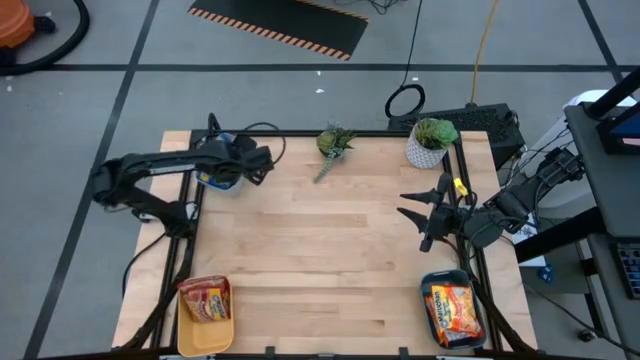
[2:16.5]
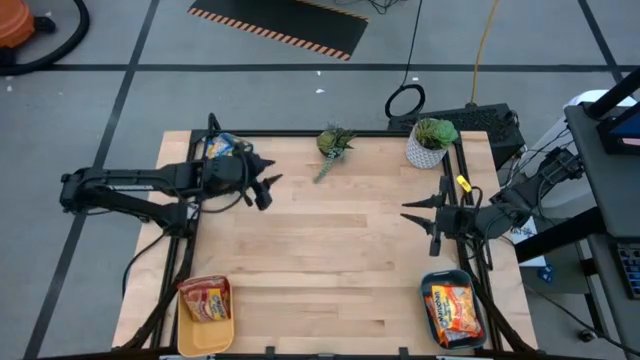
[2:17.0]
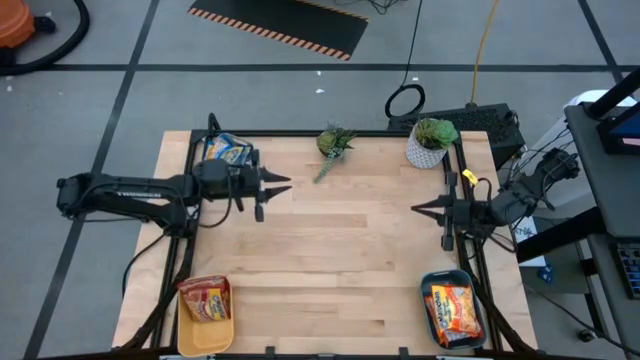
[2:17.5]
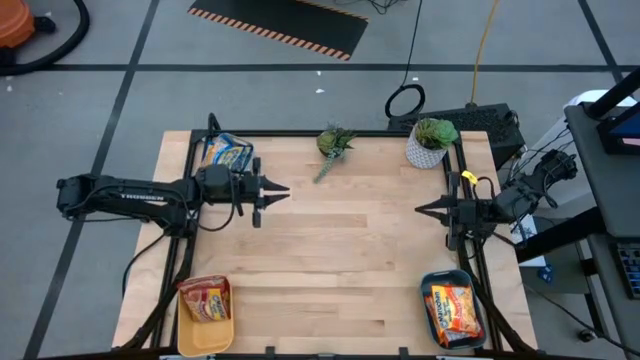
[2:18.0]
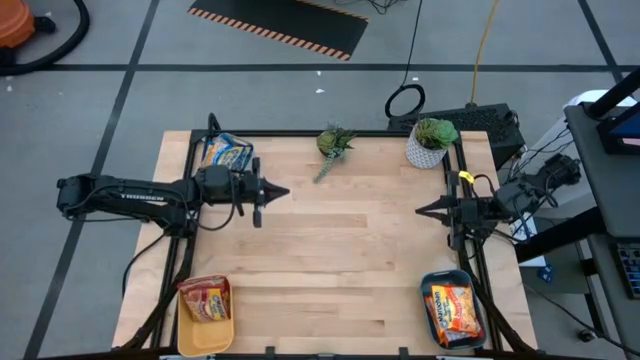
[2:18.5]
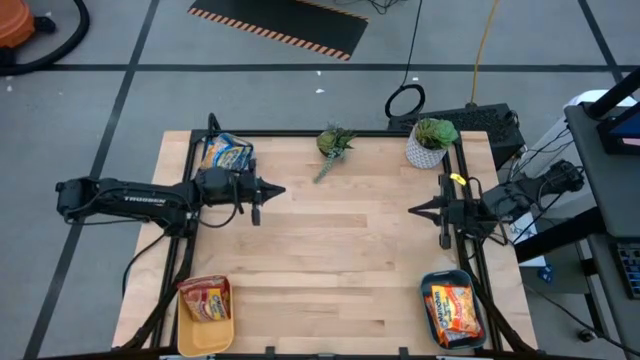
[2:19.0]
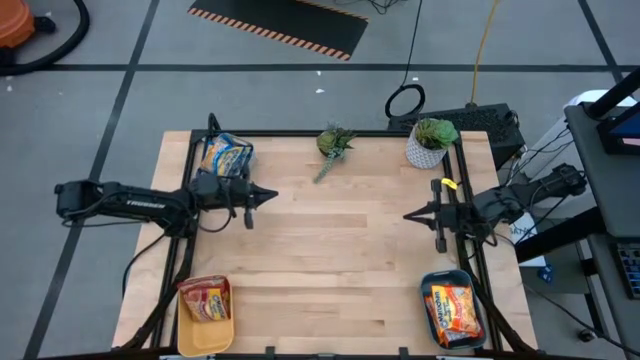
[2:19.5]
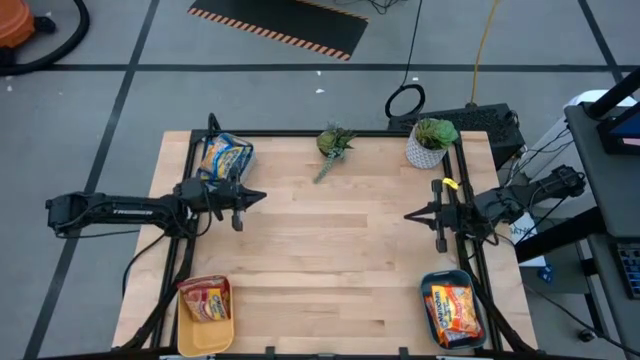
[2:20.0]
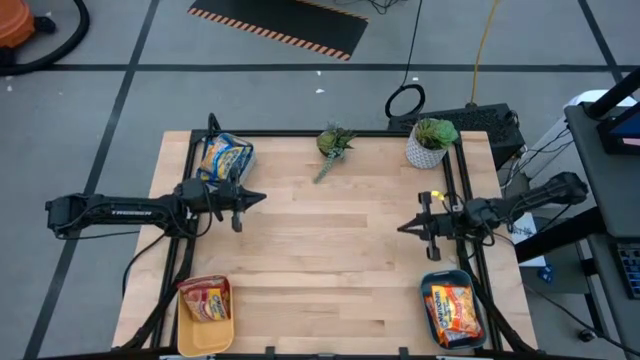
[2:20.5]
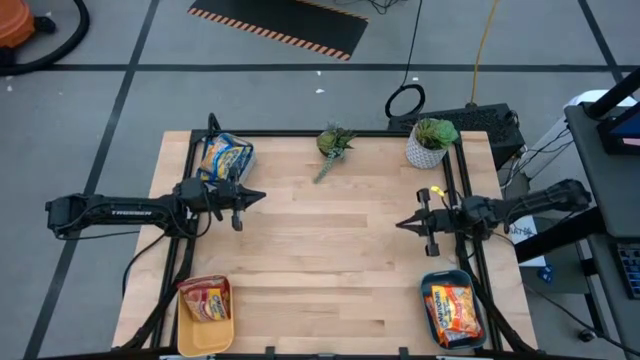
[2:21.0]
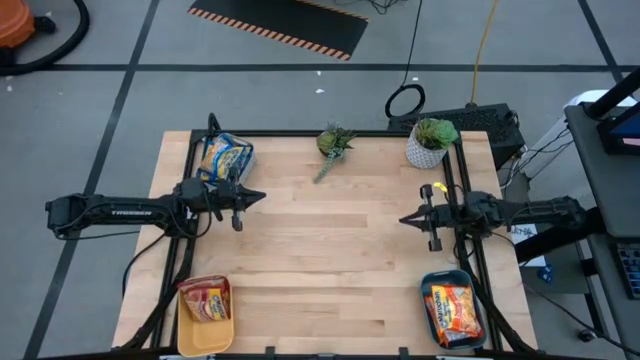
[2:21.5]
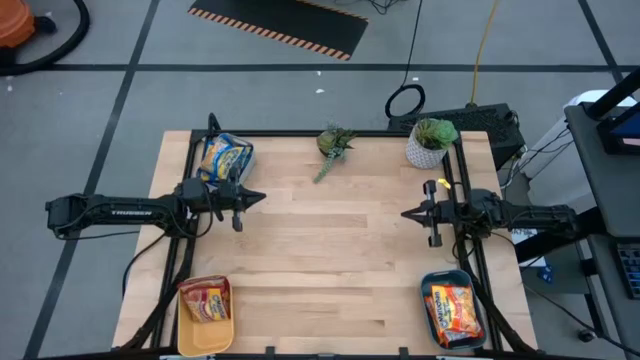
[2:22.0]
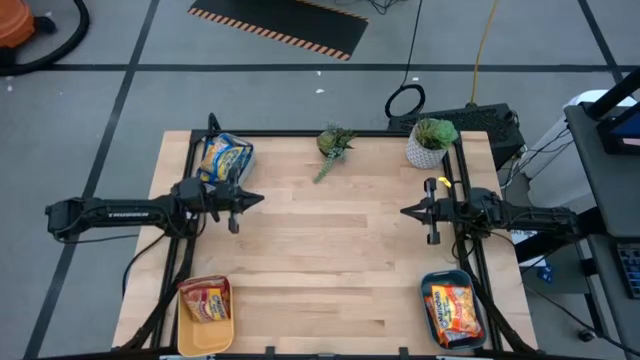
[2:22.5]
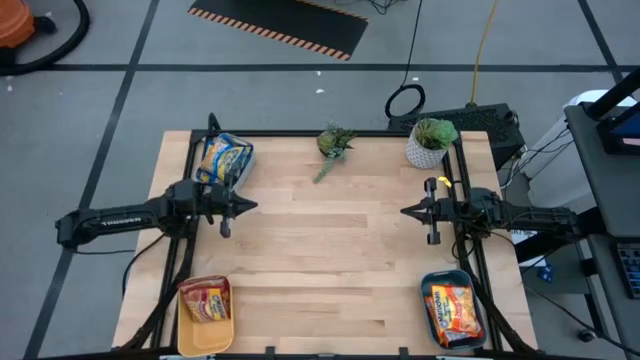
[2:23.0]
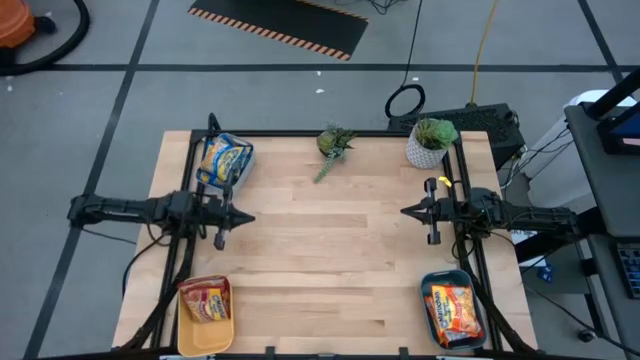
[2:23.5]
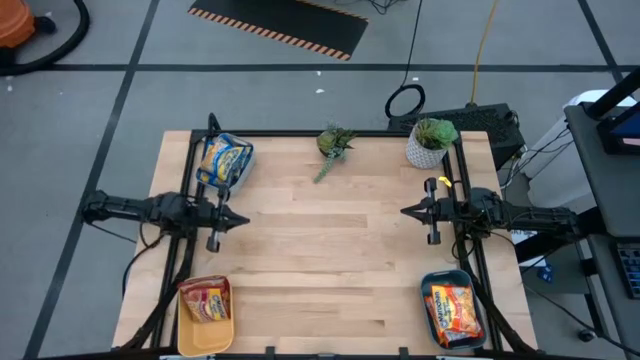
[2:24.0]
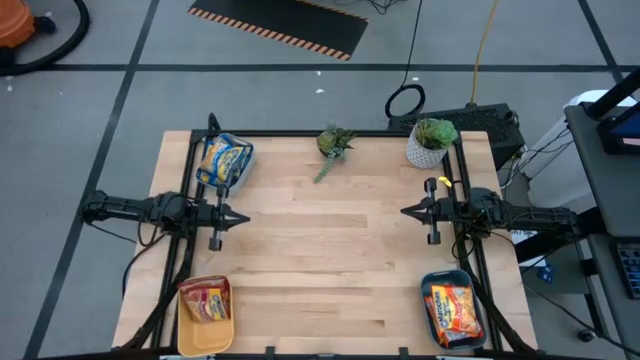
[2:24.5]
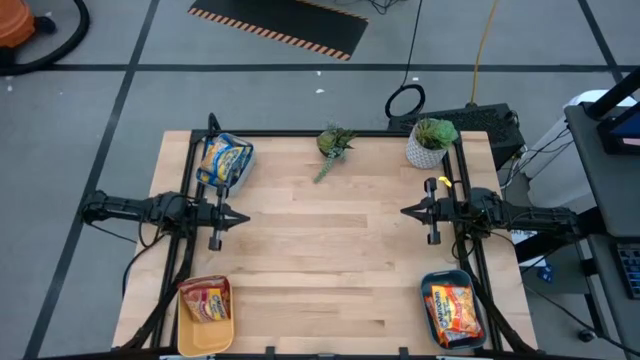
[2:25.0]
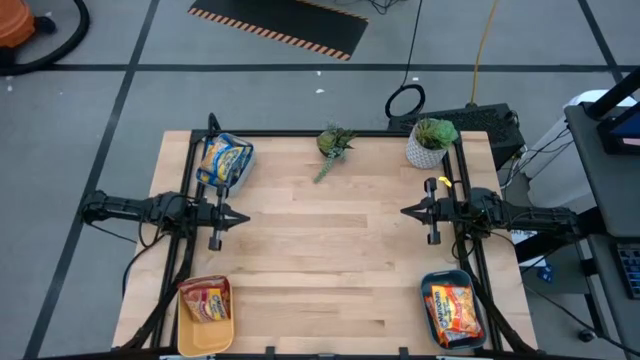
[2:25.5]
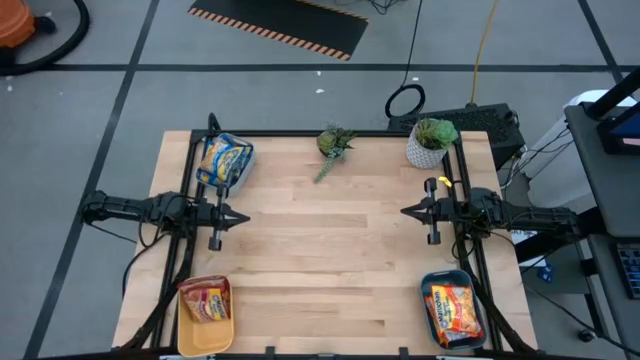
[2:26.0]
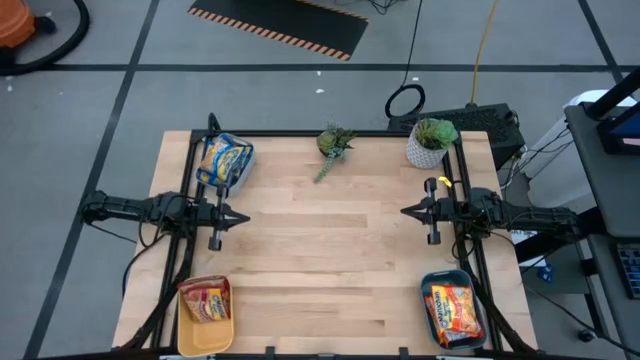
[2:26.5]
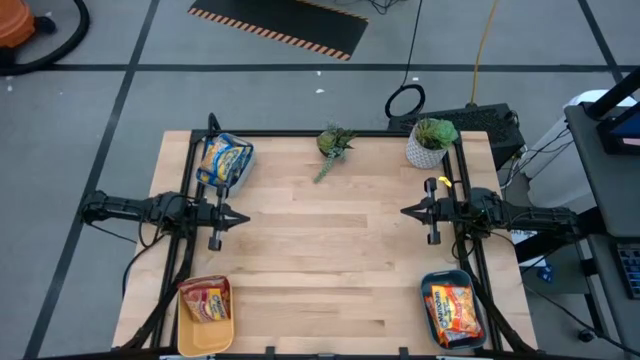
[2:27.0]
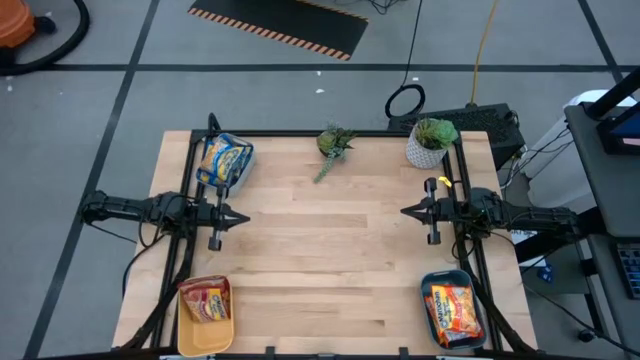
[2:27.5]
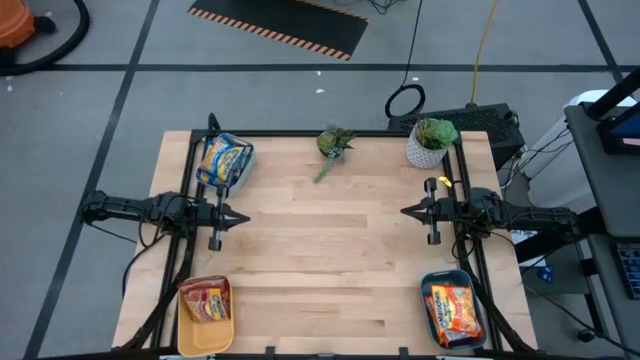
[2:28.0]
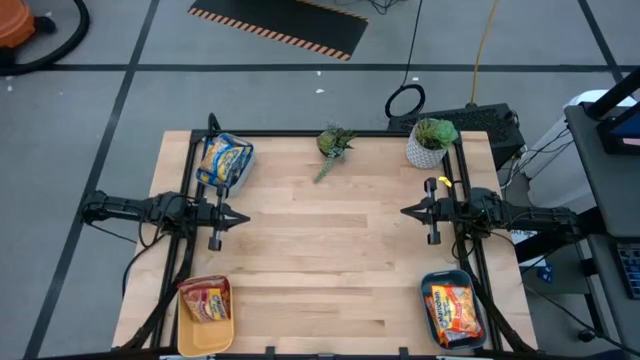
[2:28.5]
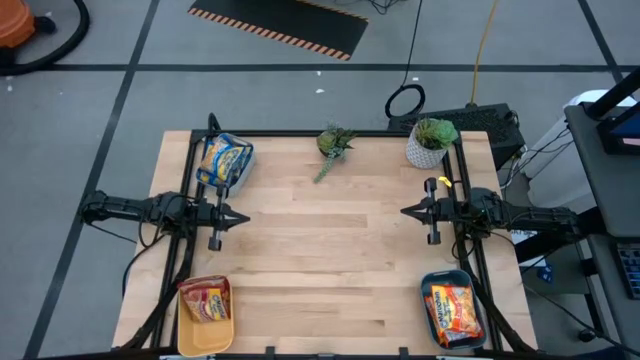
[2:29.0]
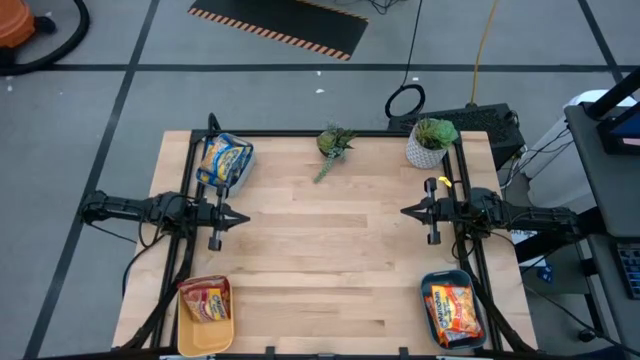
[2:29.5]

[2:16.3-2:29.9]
Task: Sort Maruchan noodles
Return to Home Position

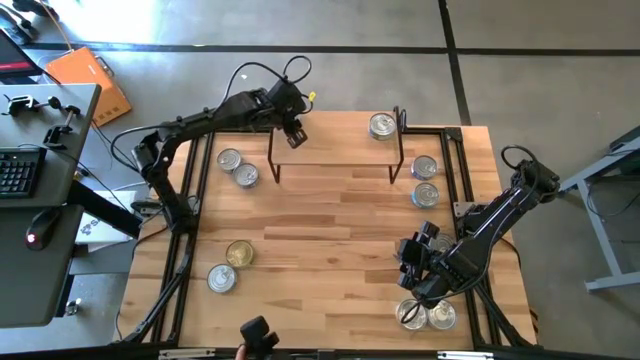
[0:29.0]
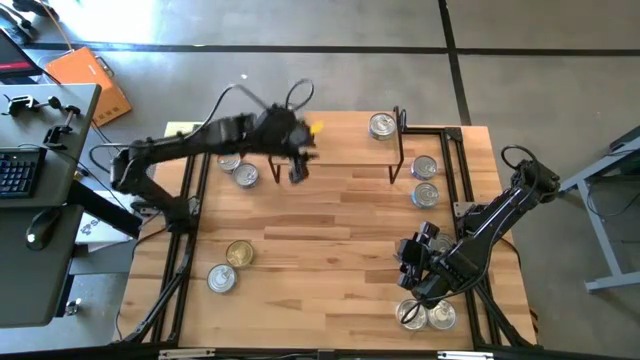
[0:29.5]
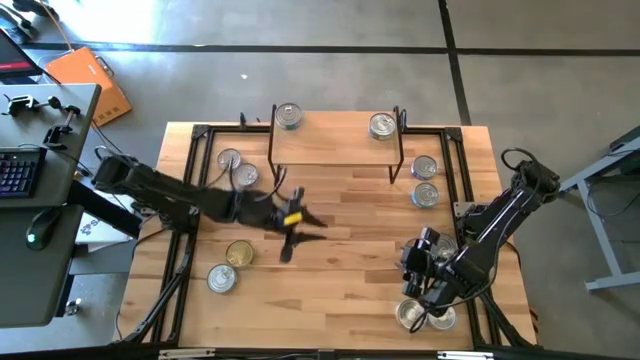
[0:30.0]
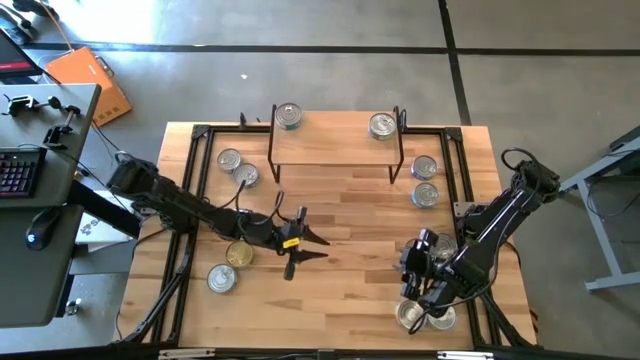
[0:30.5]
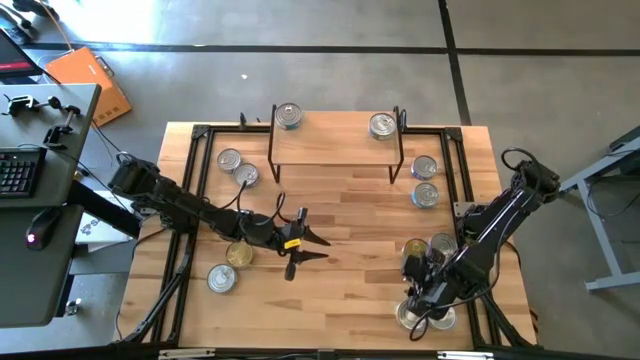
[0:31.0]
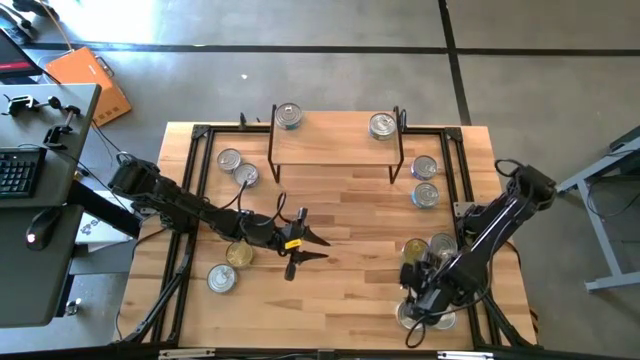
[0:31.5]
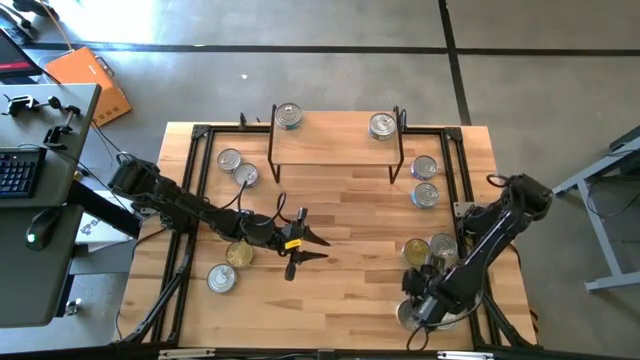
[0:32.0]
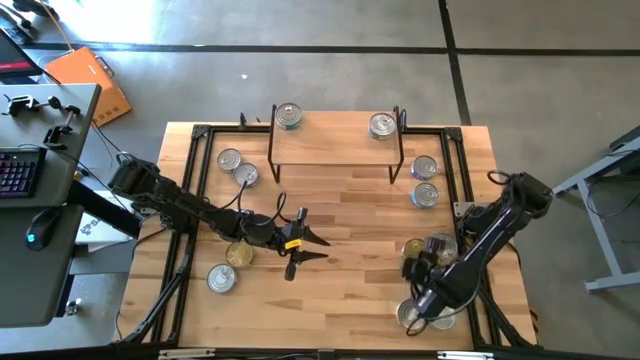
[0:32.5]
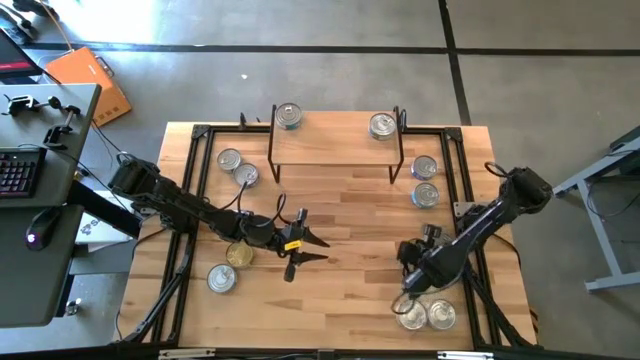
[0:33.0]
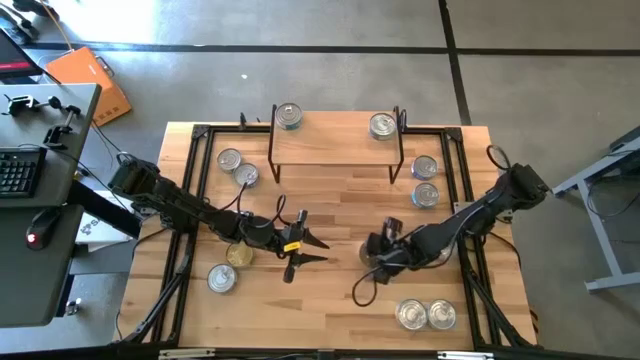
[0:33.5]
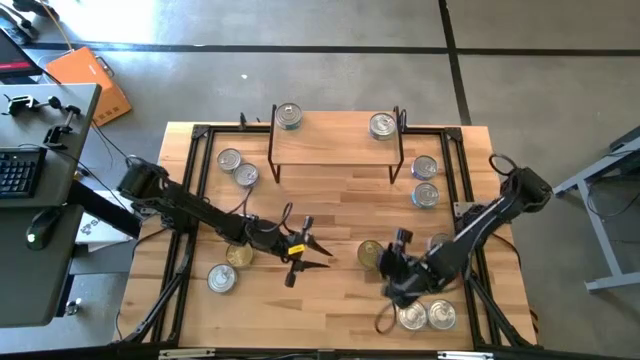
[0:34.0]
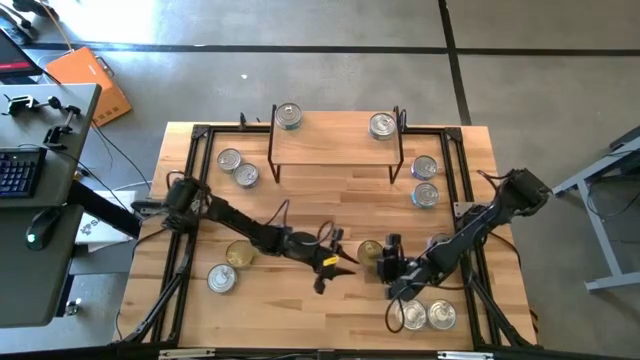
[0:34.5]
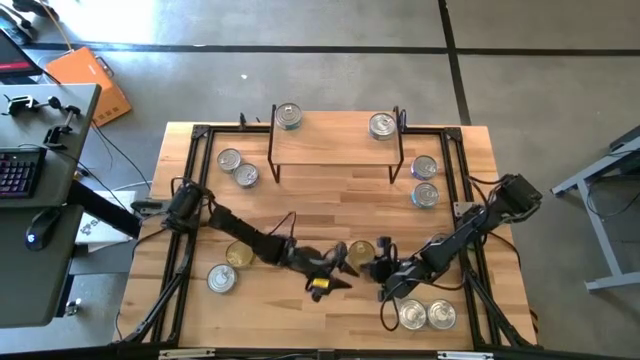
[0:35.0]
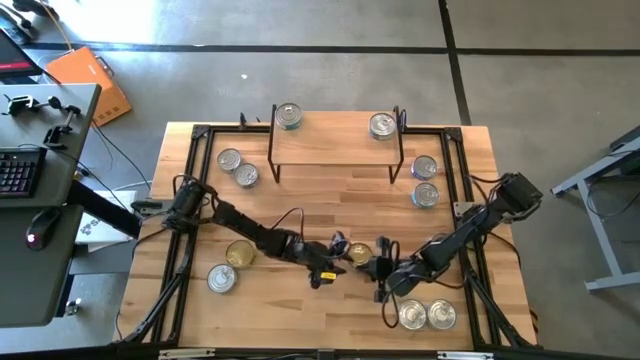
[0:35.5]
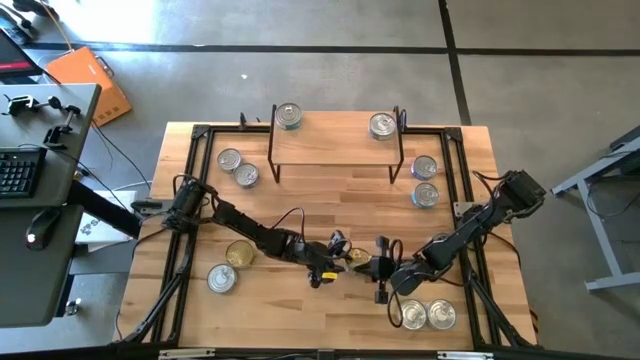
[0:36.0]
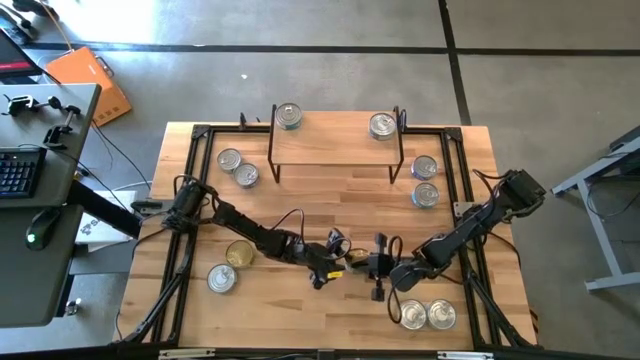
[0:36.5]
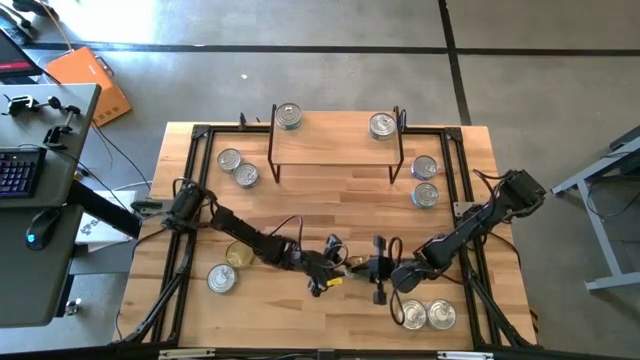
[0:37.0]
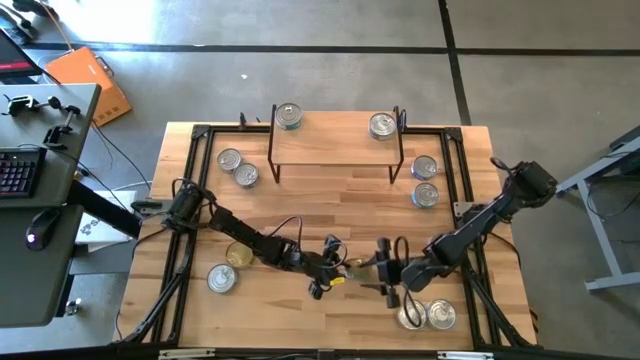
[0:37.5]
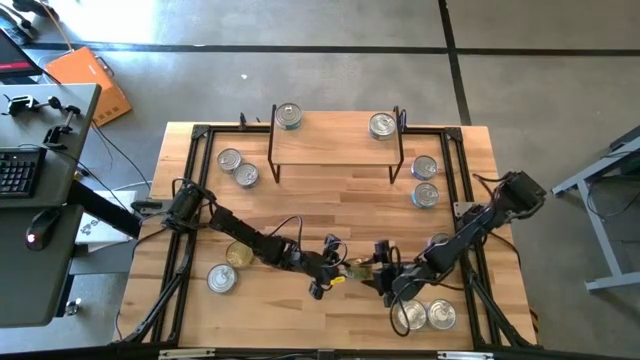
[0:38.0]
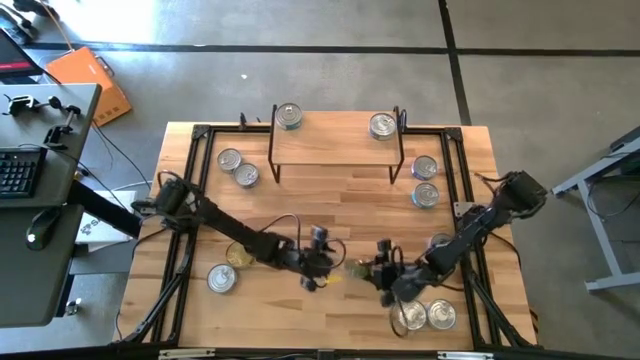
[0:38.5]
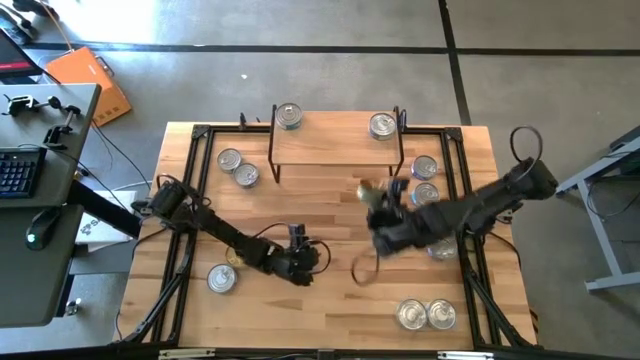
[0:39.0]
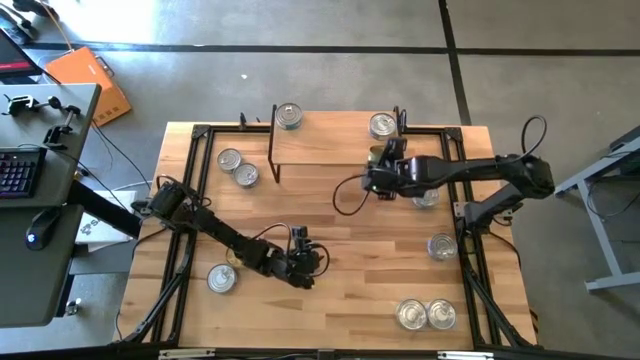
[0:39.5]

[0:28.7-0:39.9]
Task: Stack canned seafood by type on shelf
Put the green tuna can aligned with the other green tuna can on the shelf
